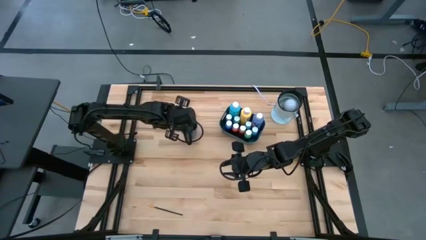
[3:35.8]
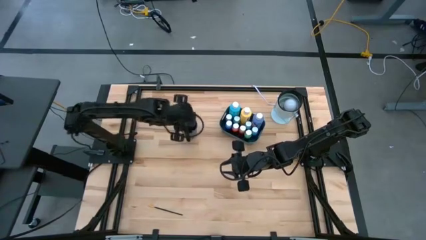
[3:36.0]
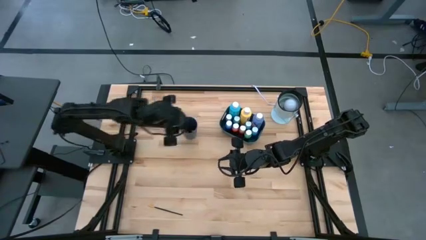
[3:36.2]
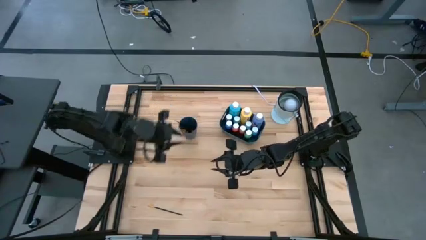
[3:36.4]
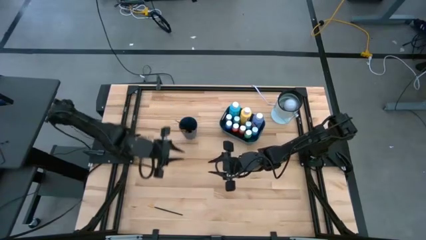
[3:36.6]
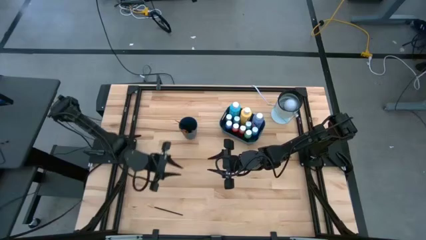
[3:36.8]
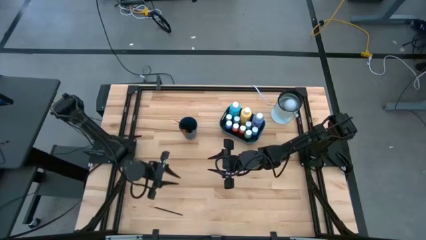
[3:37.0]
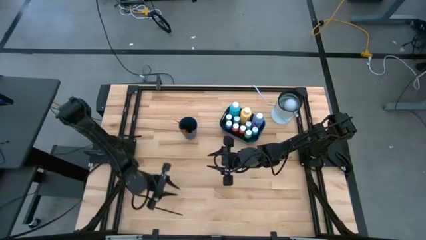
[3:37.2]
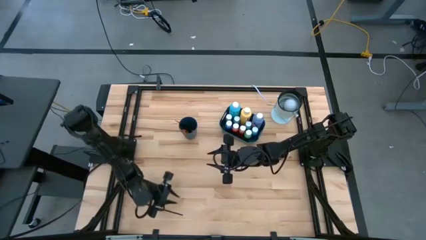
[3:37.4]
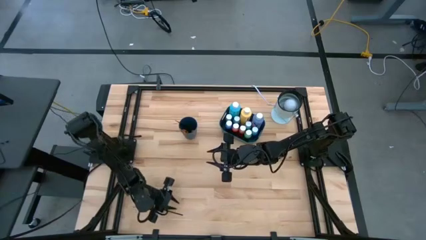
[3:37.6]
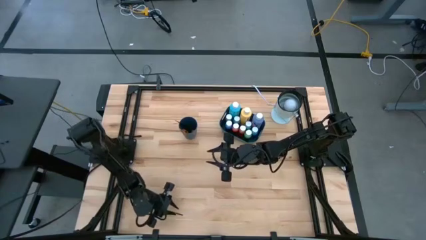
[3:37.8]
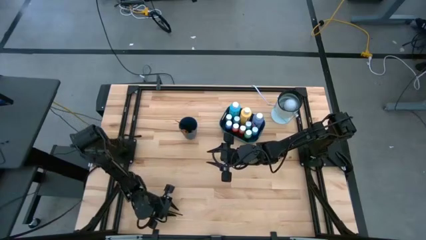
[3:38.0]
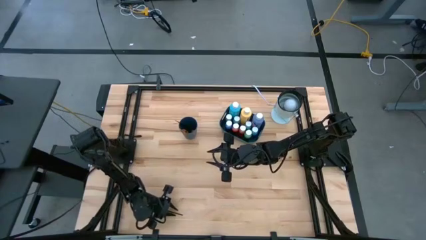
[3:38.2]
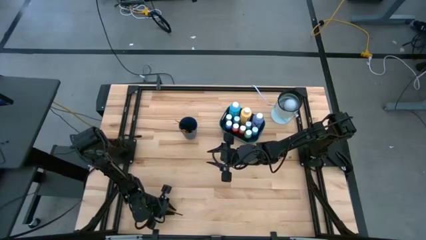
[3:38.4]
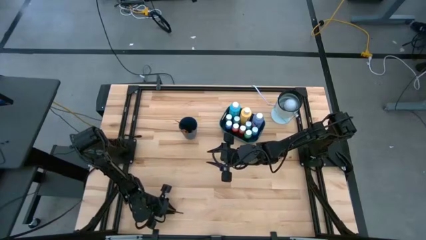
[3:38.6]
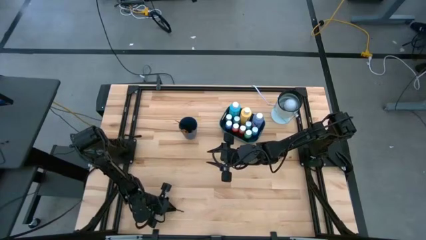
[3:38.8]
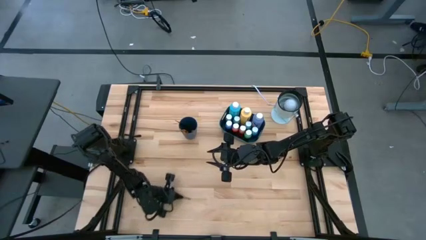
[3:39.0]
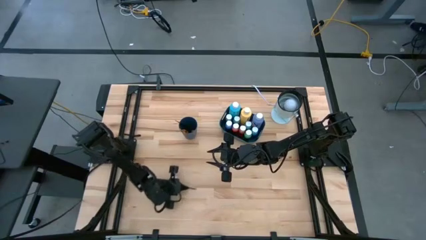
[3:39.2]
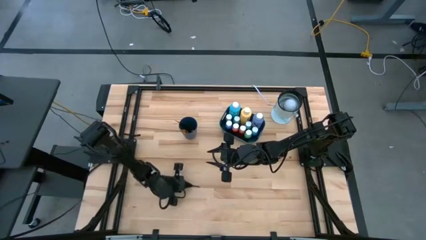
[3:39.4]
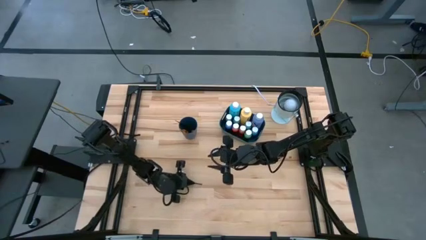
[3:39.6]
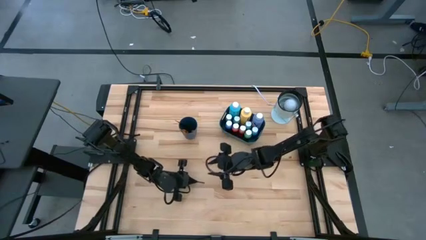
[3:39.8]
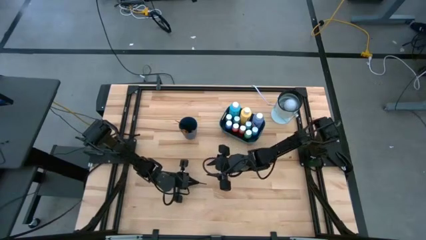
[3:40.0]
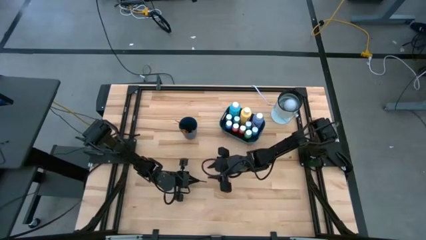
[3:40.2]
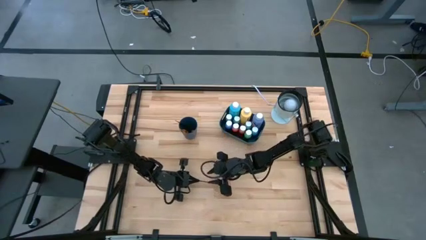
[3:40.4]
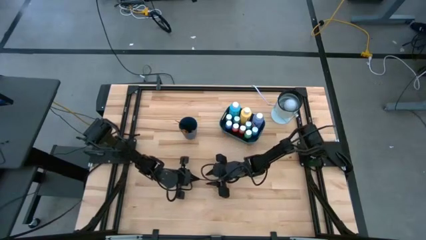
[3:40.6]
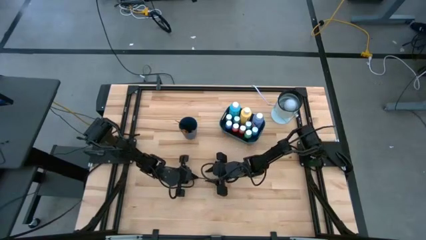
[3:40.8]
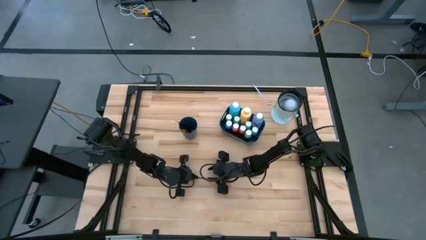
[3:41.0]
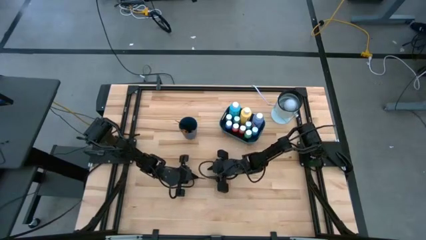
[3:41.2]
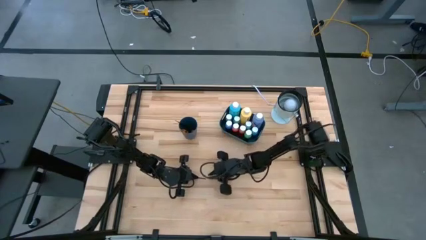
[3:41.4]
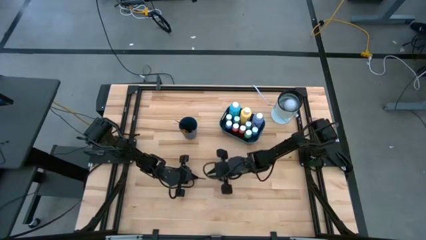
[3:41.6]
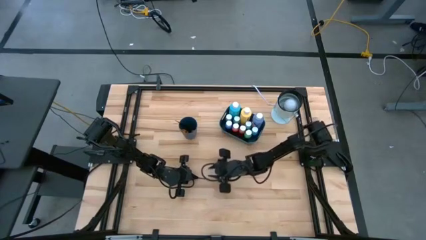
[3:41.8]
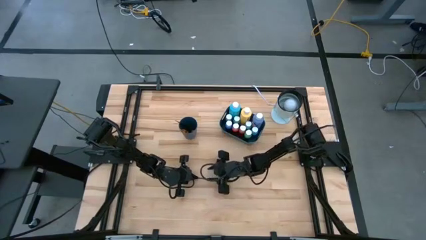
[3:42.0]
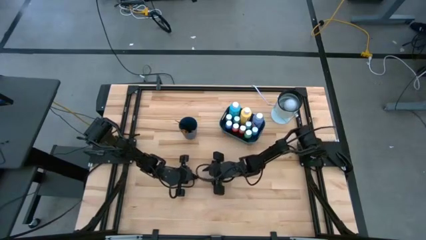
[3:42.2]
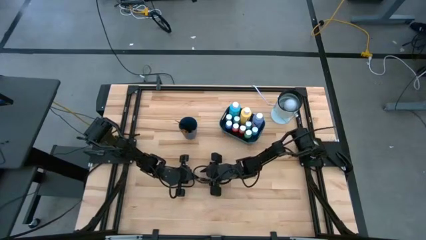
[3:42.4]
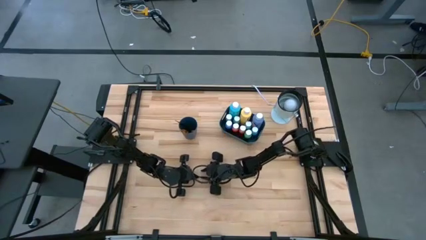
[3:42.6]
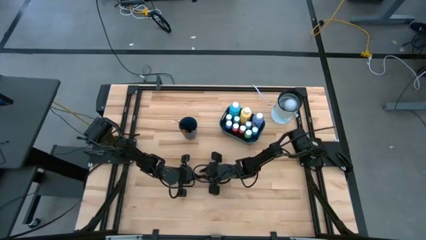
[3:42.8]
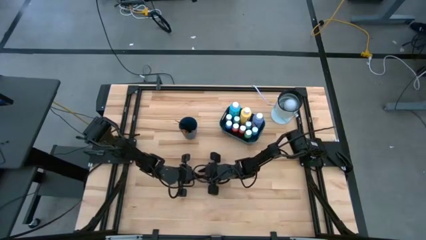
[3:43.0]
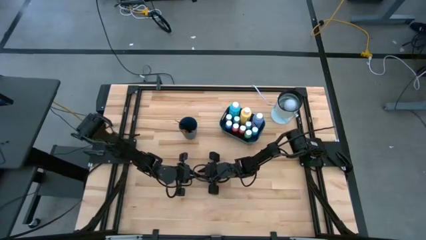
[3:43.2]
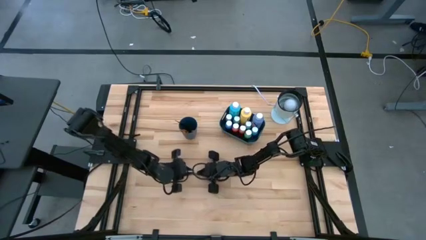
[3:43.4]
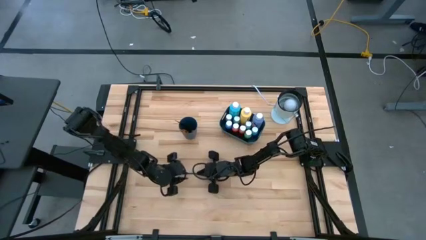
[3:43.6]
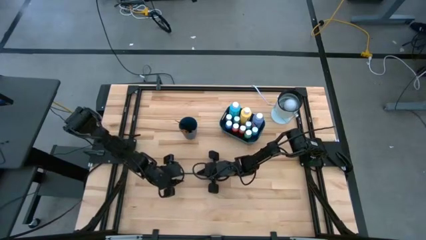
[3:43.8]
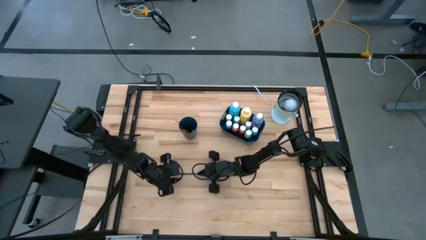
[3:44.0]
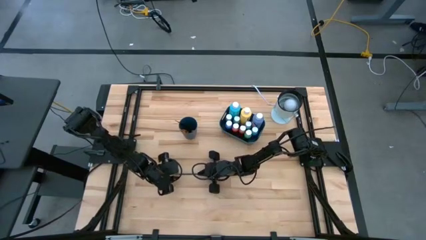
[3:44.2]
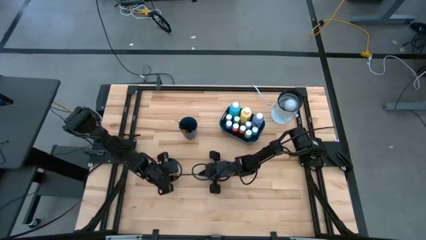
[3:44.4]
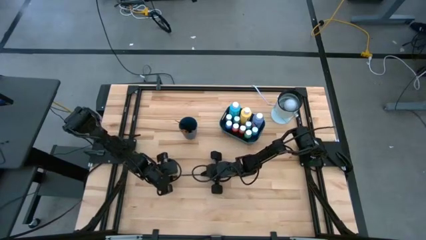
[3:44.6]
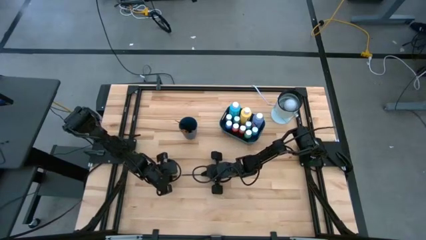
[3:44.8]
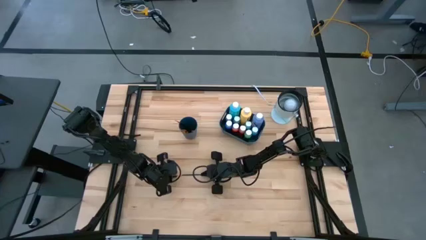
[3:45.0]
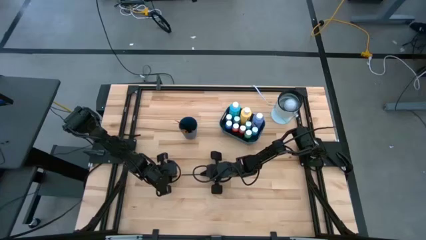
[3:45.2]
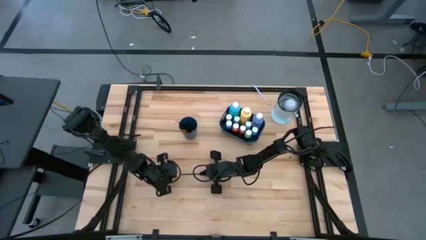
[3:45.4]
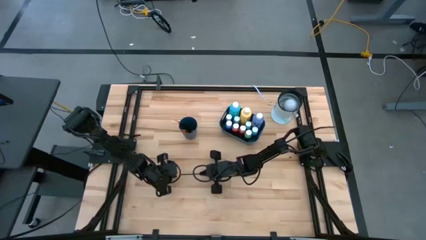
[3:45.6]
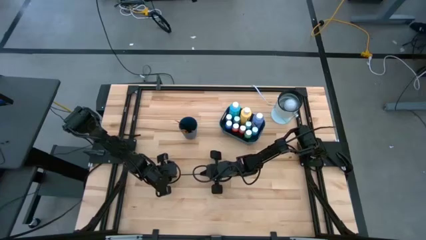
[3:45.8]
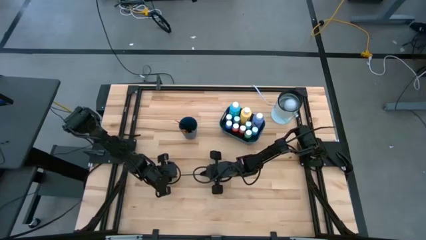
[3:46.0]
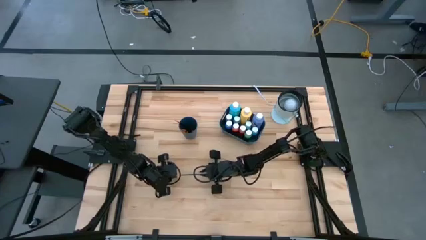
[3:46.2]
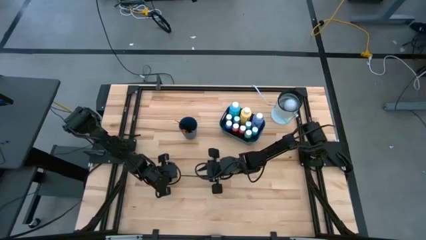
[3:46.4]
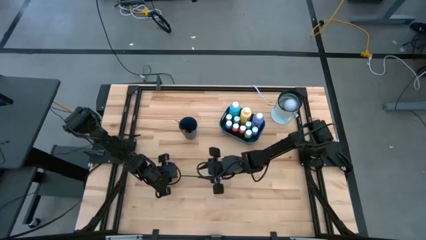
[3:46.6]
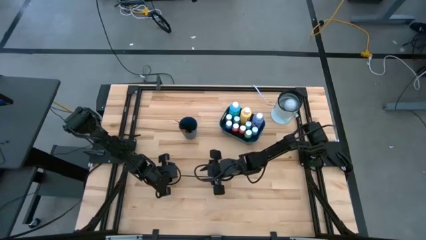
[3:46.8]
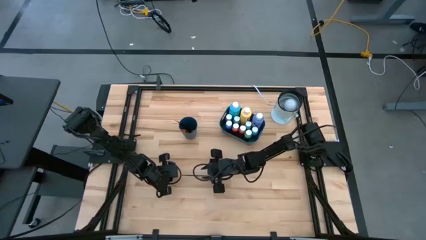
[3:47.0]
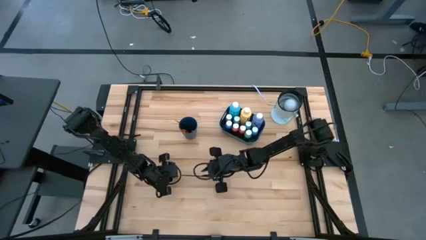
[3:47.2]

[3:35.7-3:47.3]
Task: Pick & Place Paint Supplies
Put the gold paintbrush into the blue cup

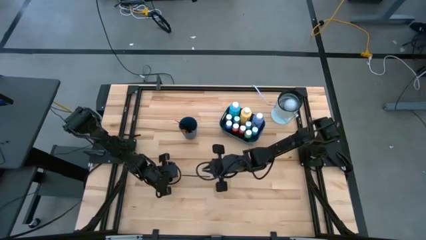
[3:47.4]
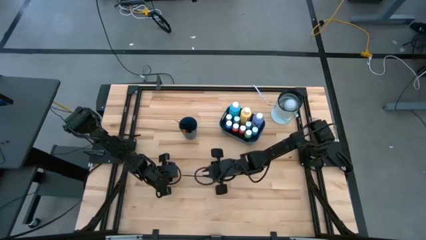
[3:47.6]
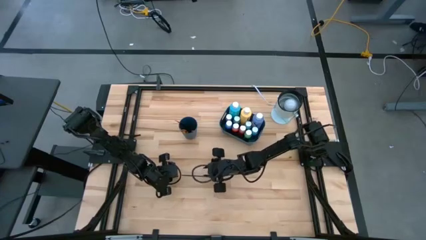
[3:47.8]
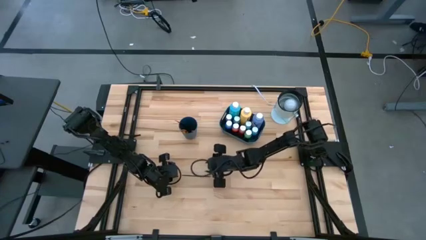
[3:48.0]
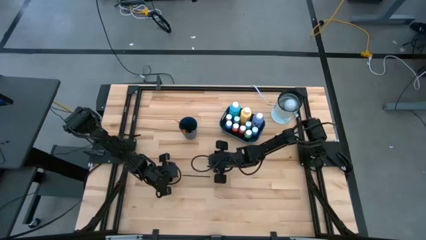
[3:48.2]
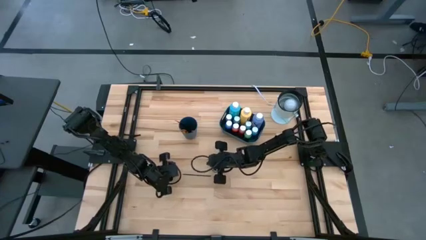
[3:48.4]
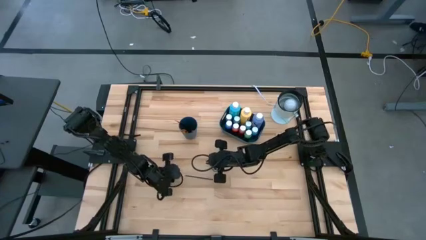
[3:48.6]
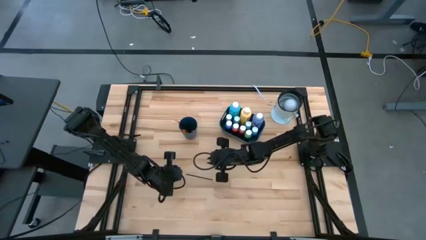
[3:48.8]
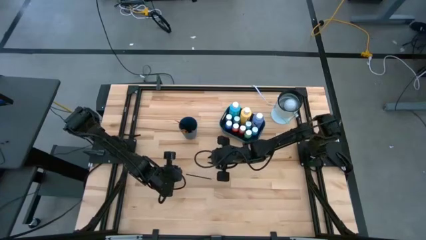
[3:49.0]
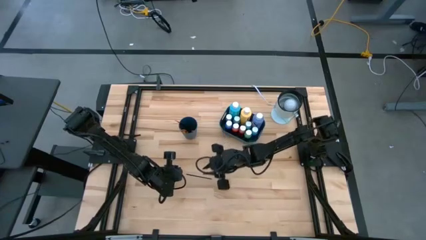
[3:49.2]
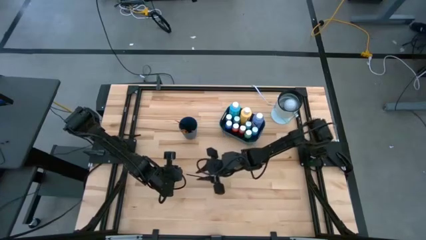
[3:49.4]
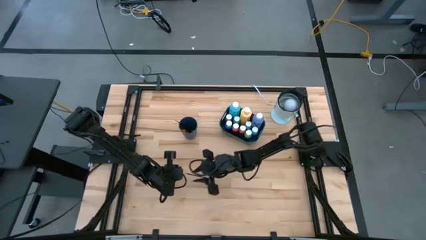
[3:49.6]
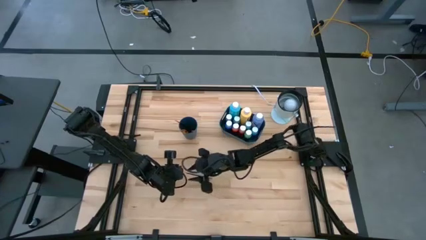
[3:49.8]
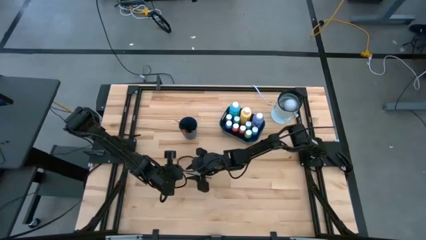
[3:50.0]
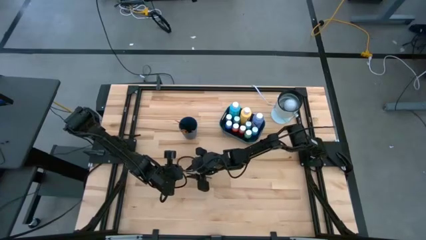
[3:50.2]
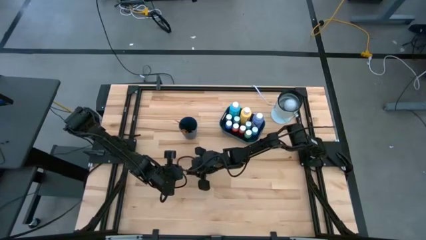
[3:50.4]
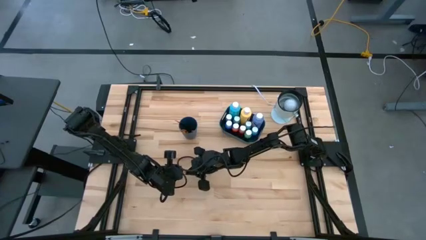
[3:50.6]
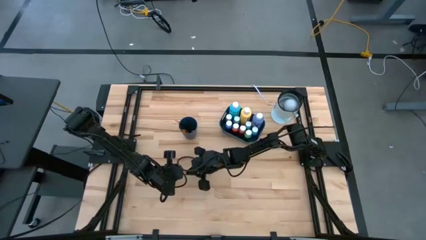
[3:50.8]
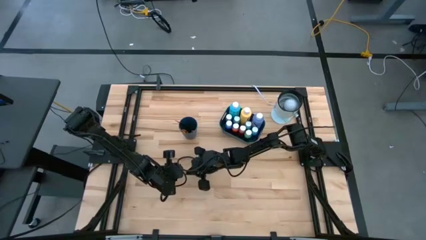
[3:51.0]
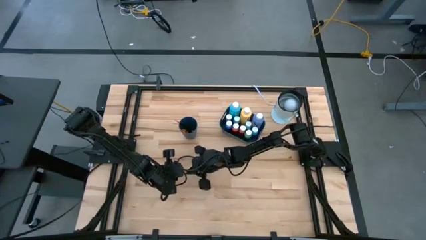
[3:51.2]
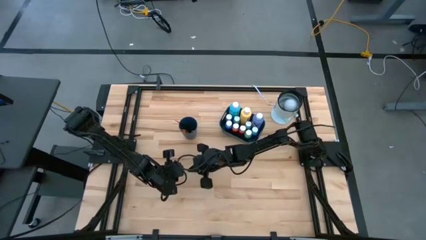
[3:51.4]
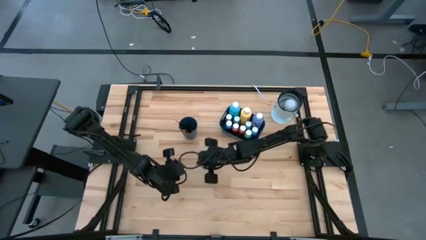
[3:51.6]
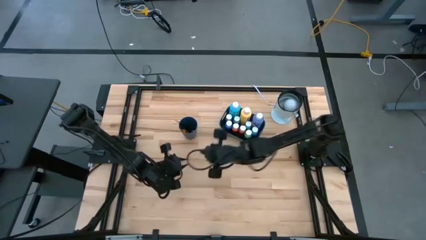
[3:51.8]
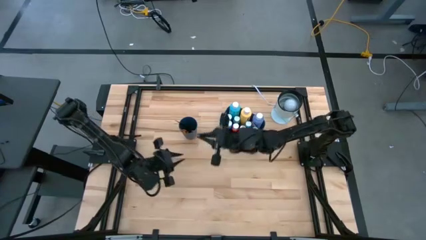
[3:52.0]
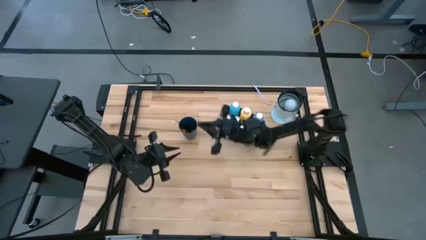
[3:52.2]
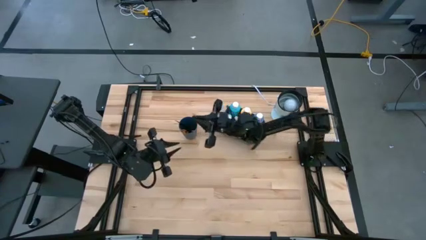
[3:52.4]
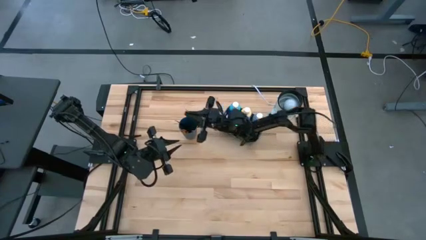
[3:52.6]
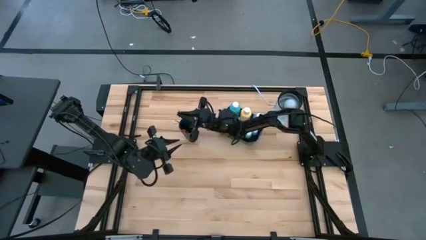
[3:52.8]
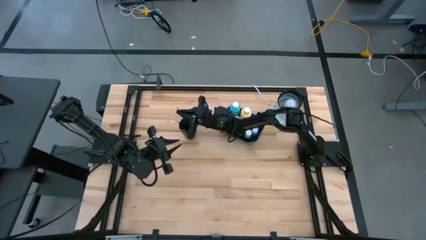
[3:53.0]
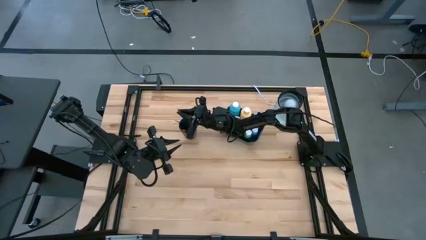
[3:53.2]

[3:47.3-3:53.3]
Put the gold paintbrush into the blue cup
